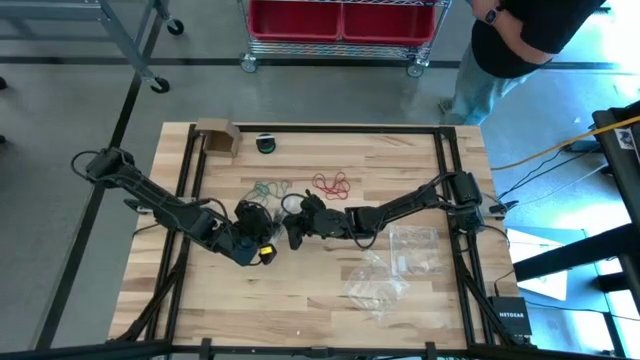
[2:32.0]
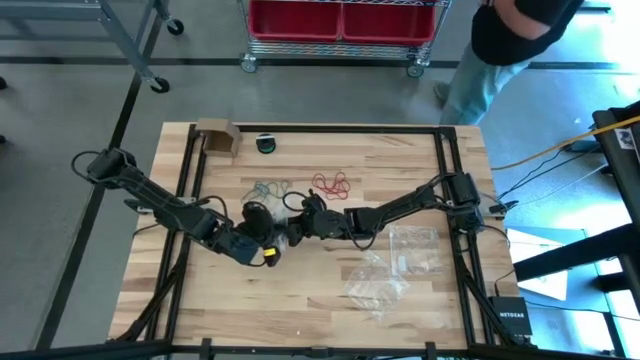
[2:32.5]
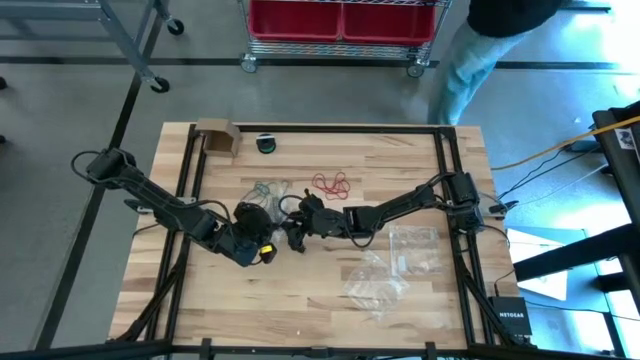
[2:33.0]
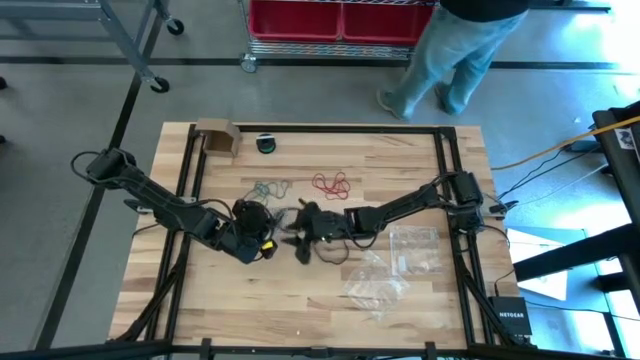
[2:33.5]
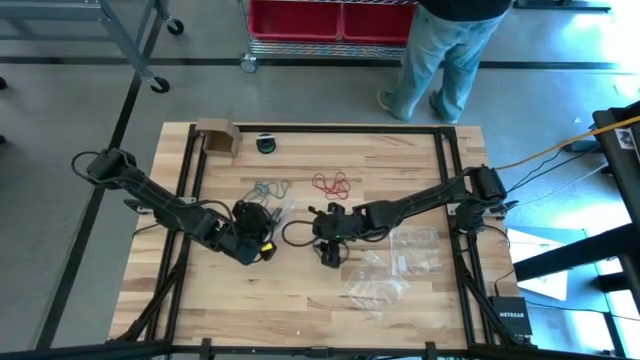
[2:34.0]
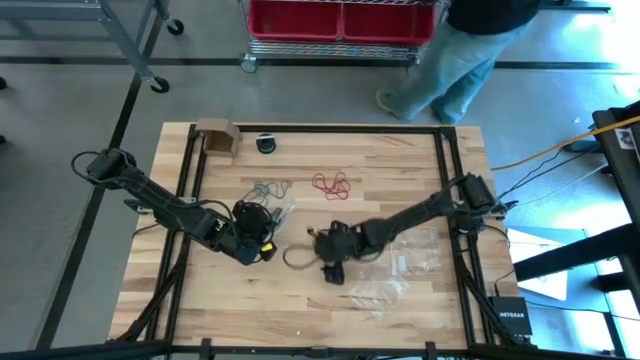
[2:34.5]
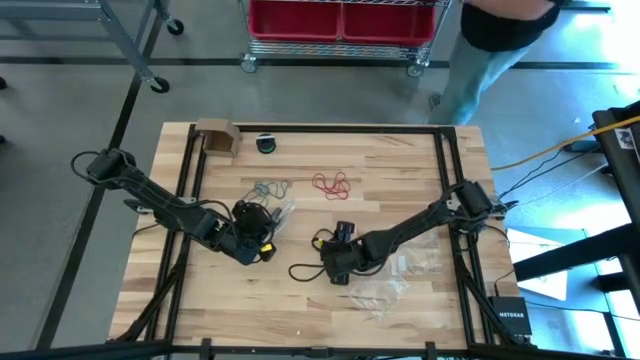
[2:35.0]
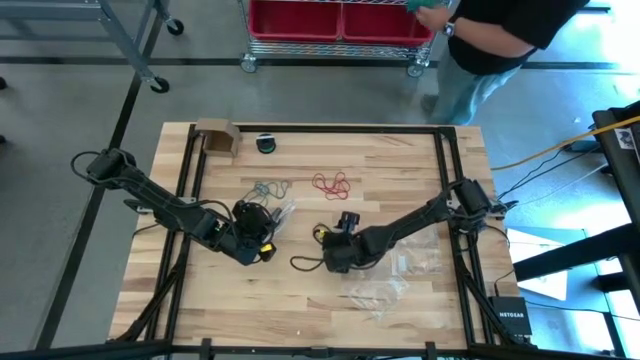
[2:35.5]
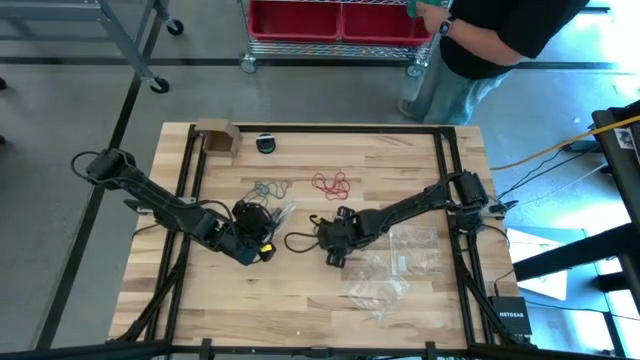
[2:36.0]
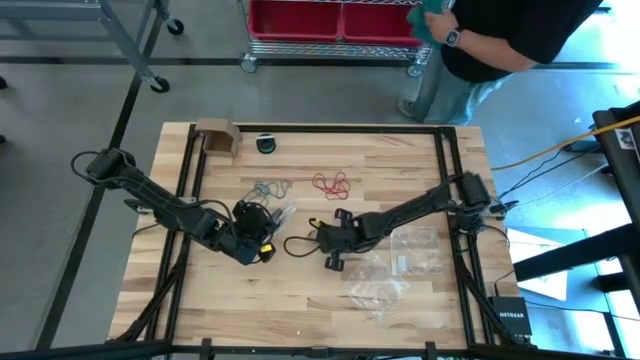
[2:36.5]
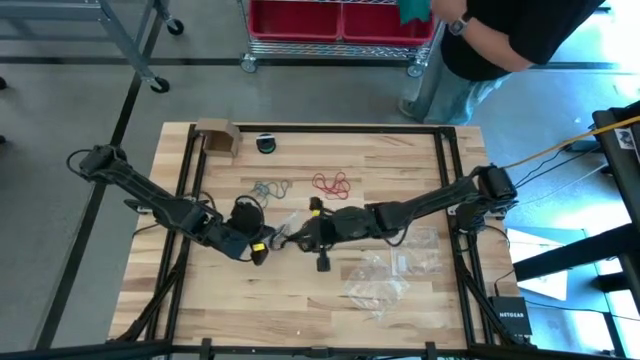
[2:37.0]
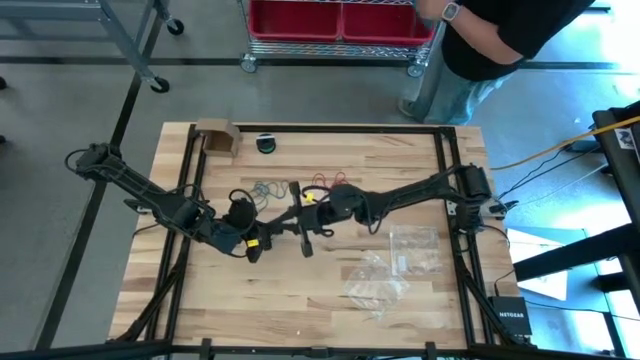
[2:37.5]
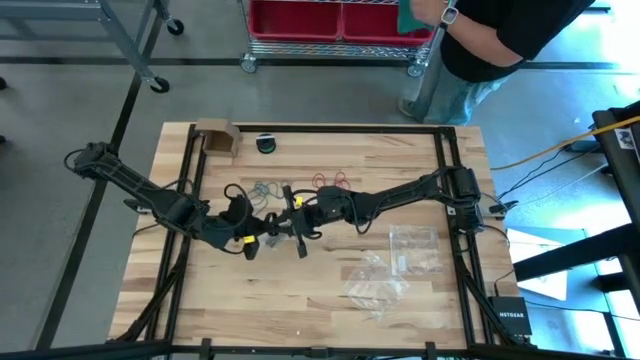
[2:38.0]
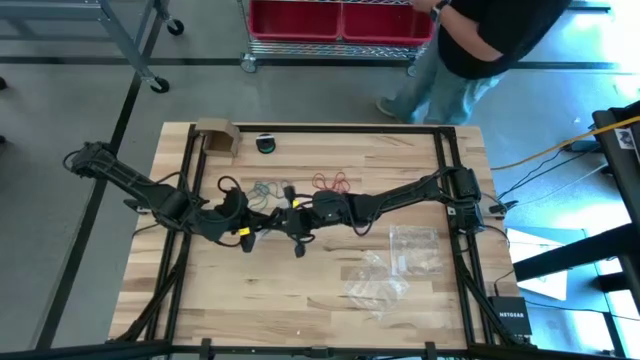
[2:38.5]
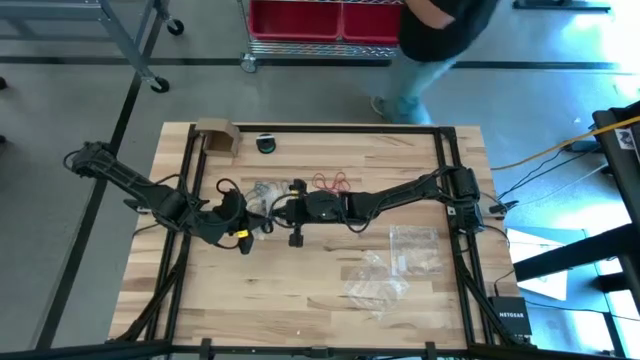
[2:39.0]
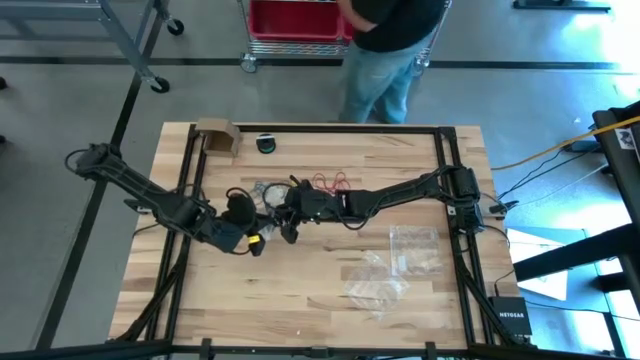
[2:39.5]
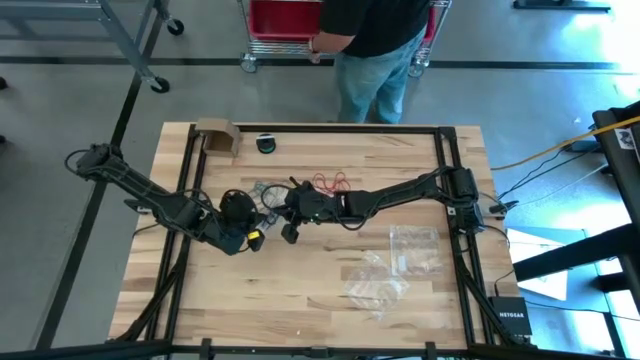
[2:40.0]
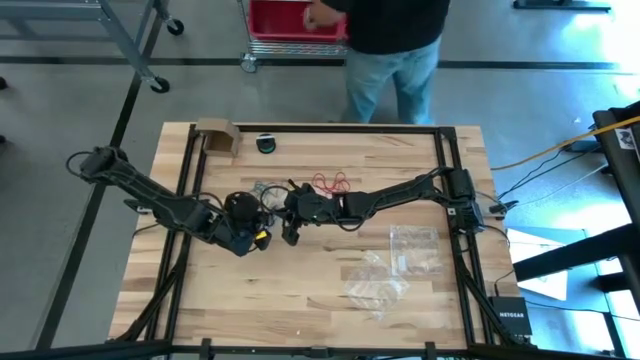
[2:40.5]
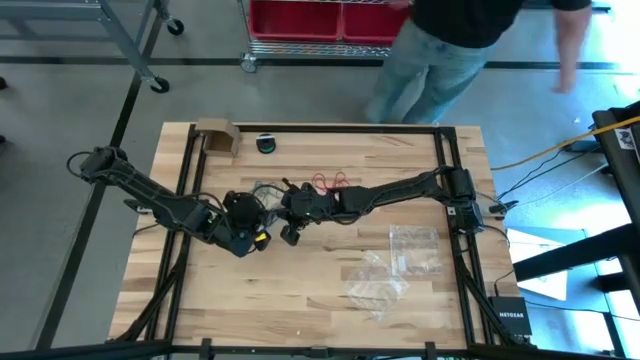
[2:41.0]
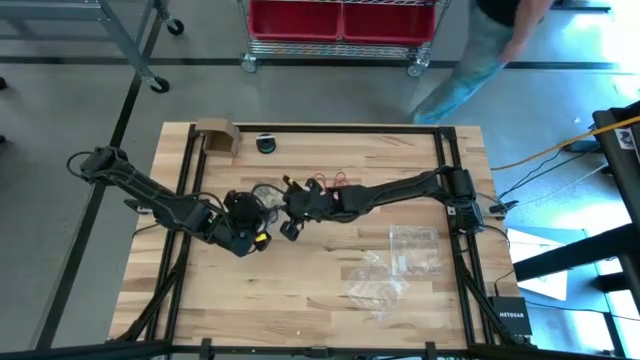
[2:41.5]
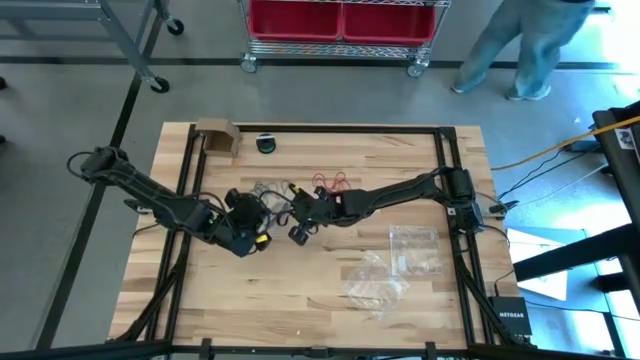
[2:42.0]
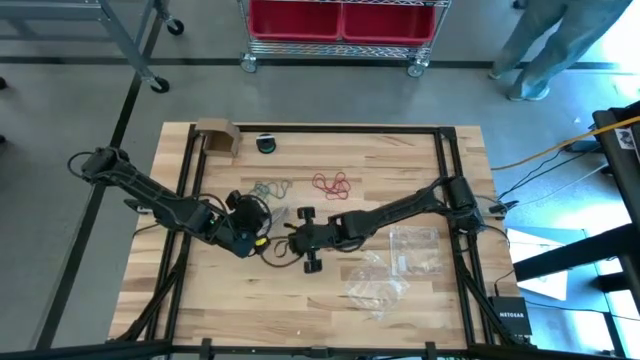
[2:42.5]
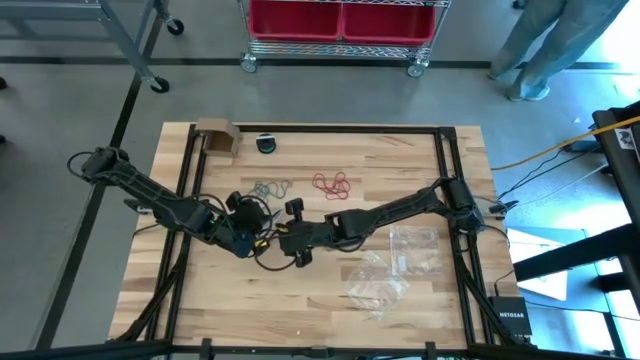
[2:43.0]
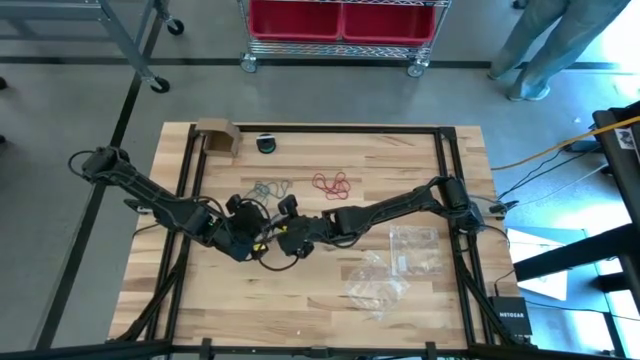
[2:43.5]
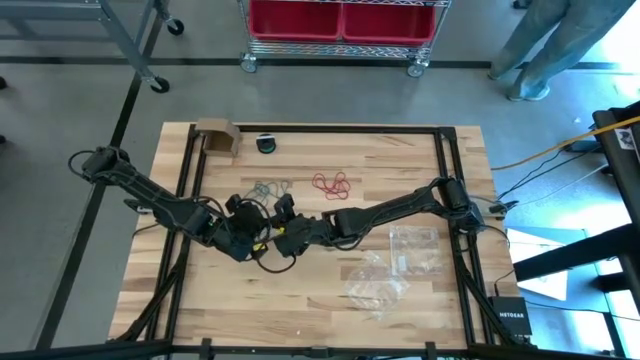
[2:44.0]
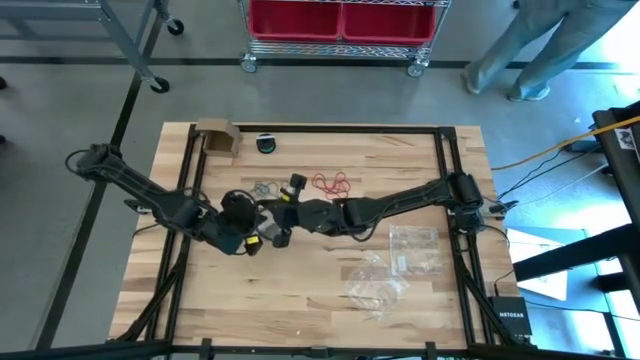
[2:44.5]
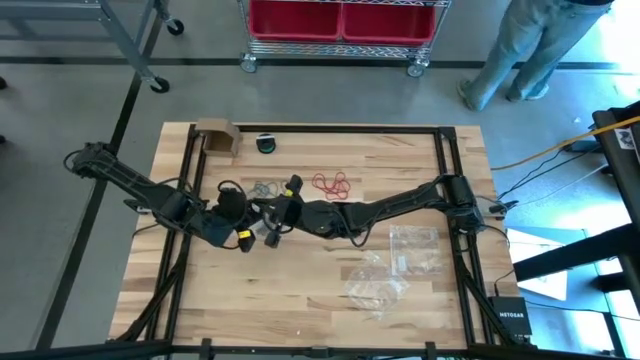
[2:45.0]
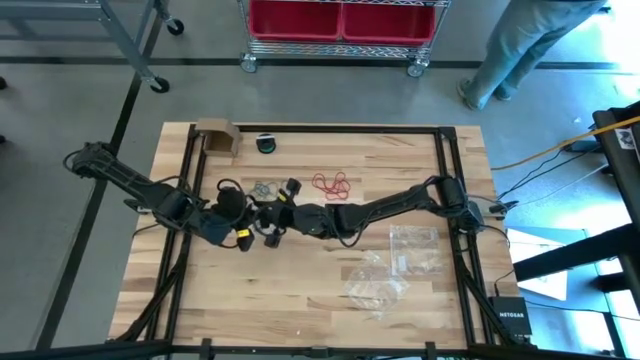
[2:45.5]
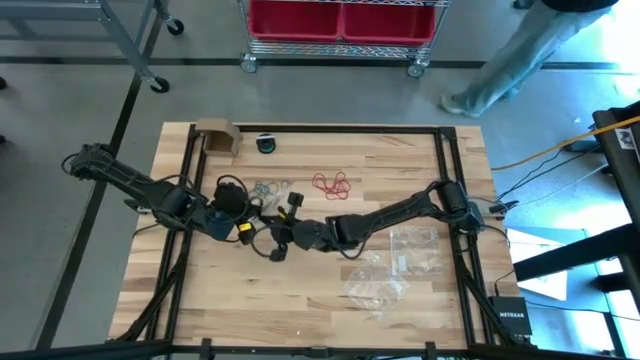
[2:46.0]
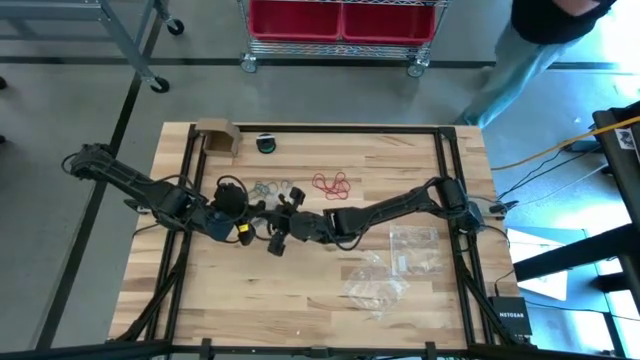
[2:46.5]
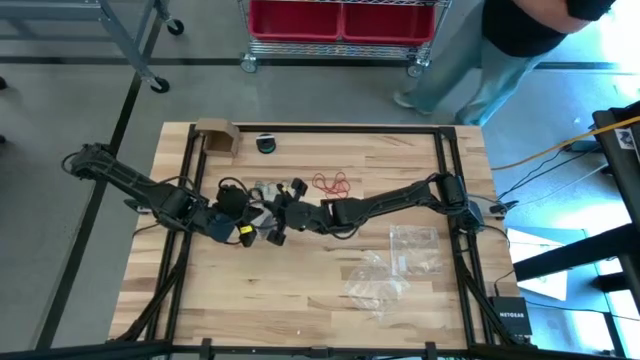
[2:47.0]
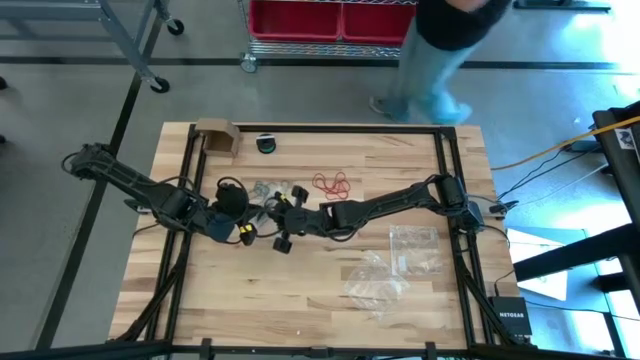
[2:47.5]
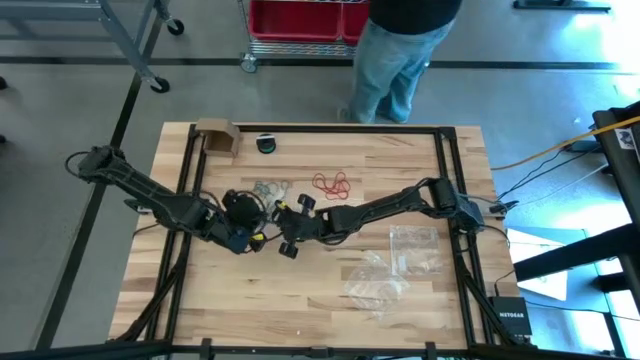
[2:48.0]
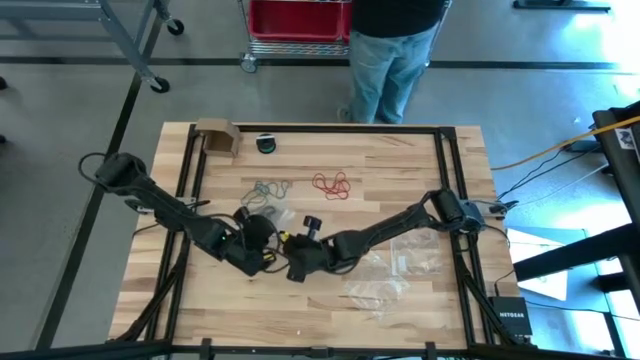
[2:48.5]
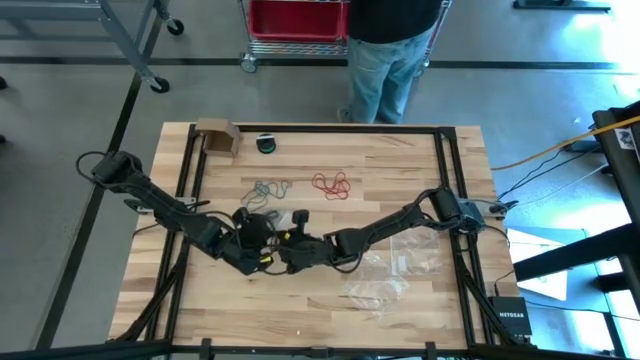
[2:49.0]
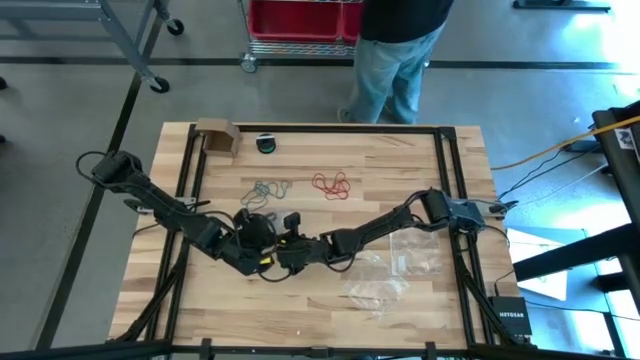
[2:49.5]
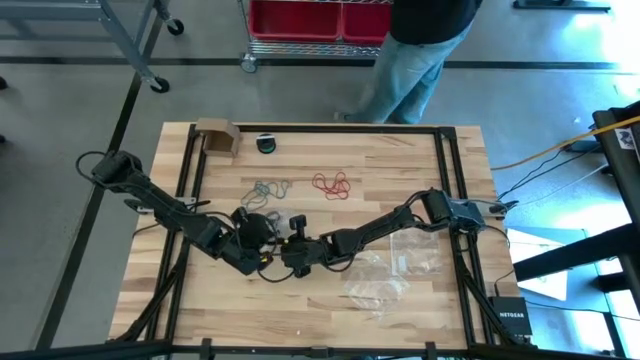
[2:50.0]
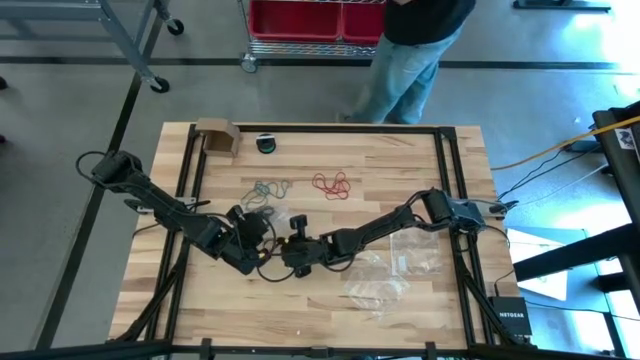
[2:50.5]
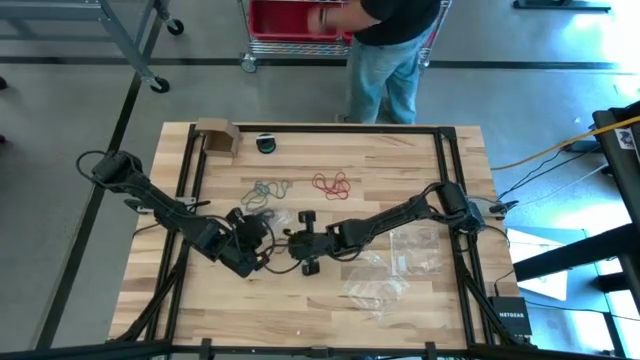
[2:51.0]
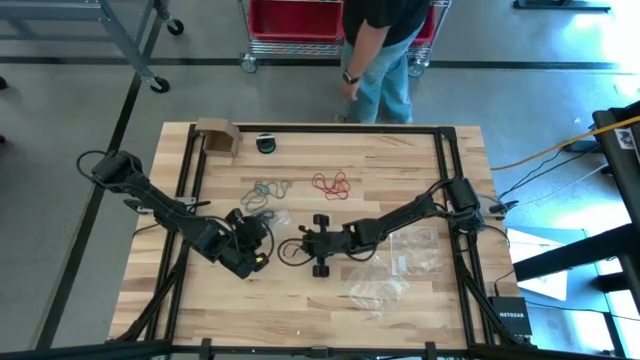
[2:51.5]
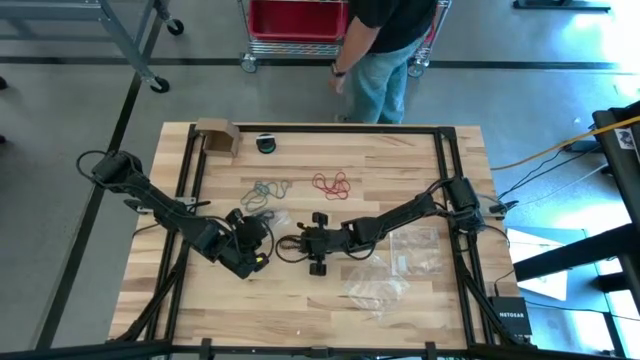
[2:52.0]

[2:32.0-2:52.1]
Task: Sort rubber bands
Put the black rubber band into the transparent zip bag

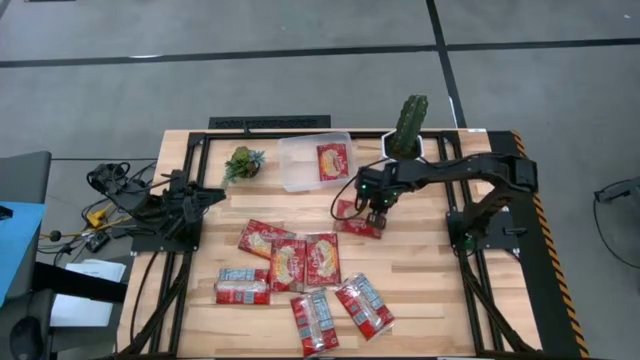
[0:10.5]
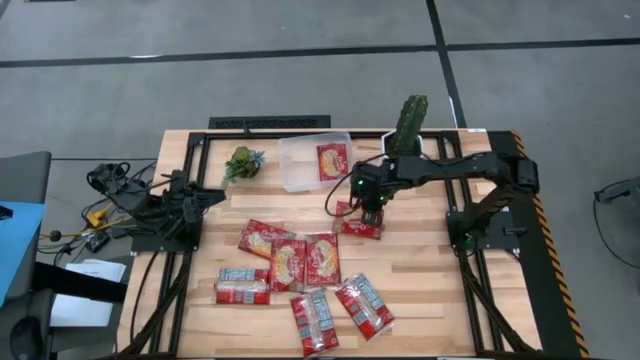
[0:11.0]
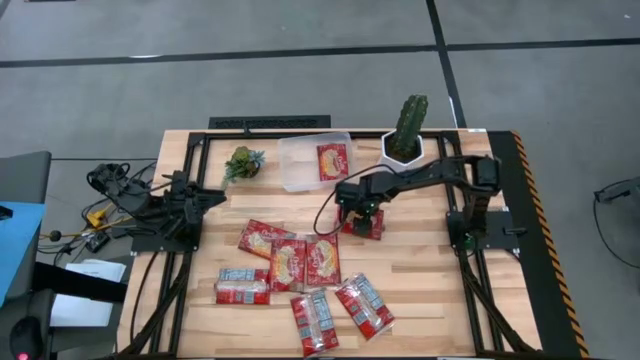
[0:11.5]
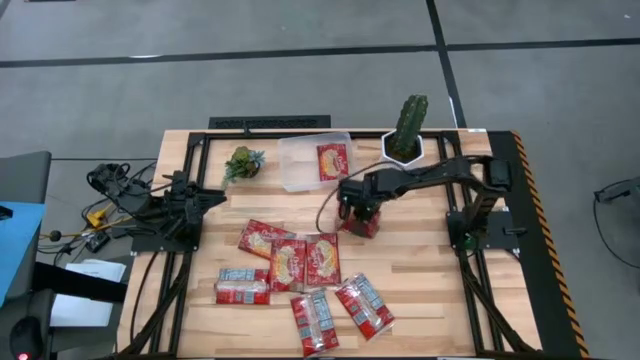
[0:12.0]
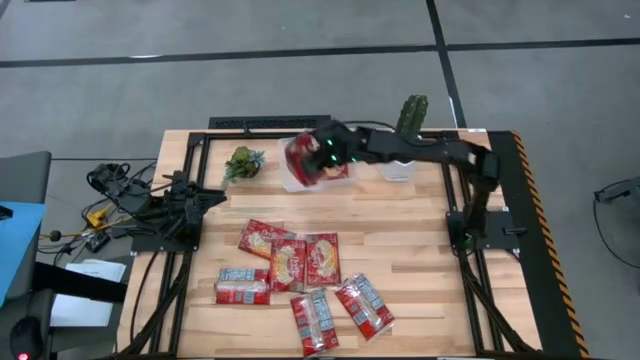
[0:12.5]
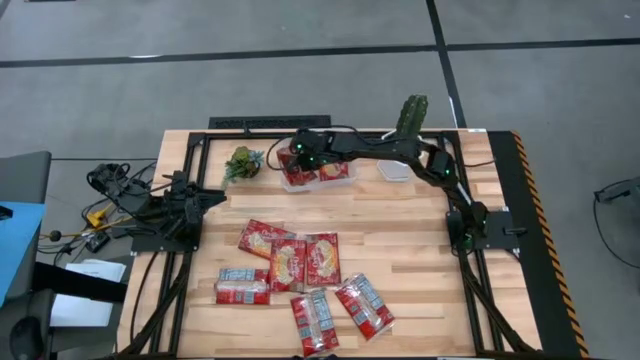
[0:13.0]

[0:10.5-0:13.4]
Task: Sort popcorn bags into baskets
Put the red popcorn bag into the transparent bin
